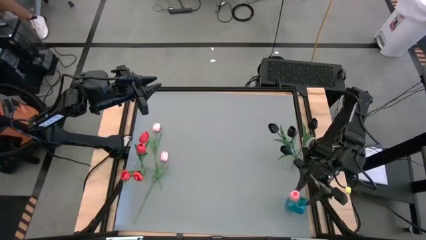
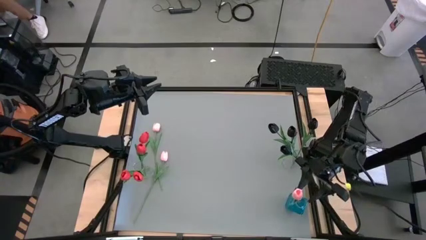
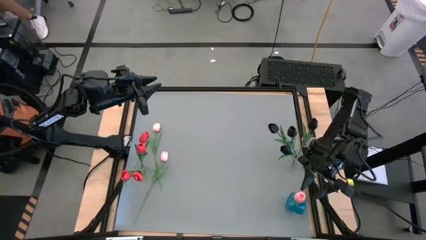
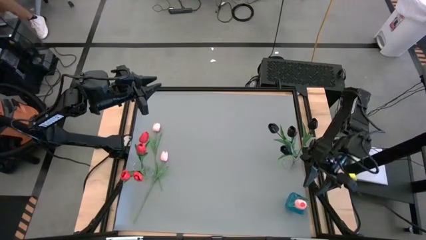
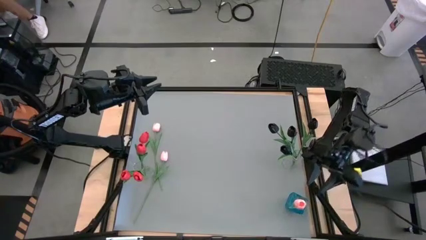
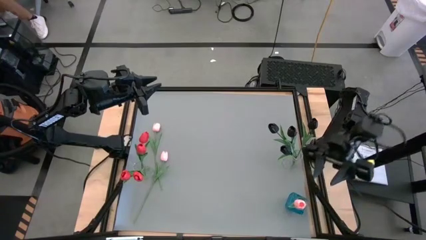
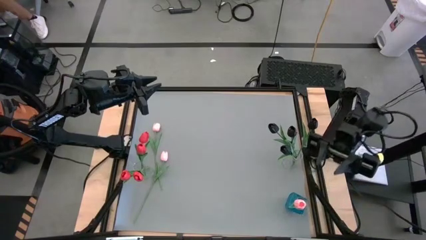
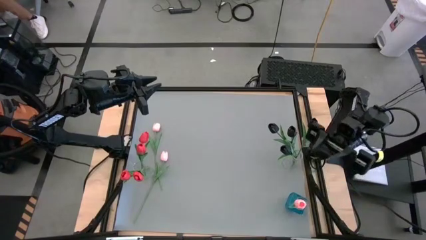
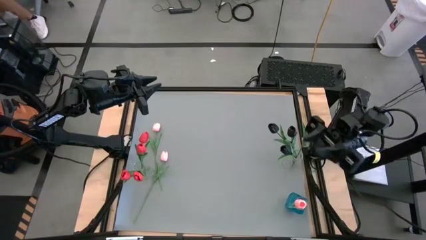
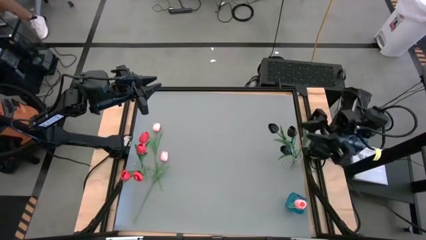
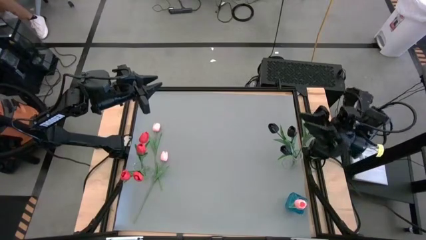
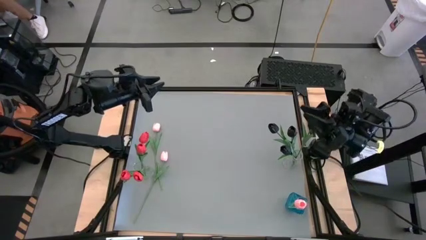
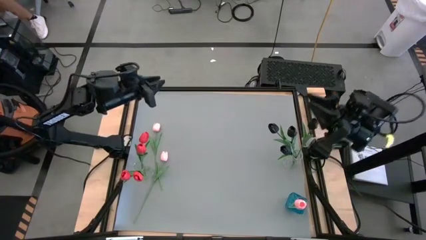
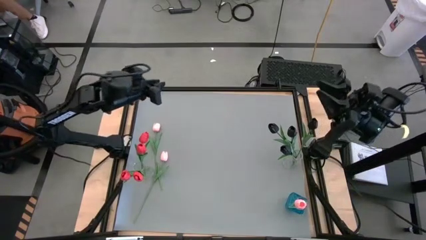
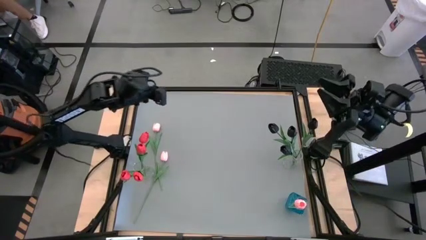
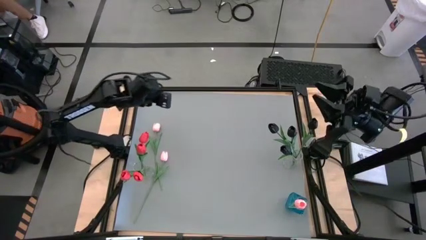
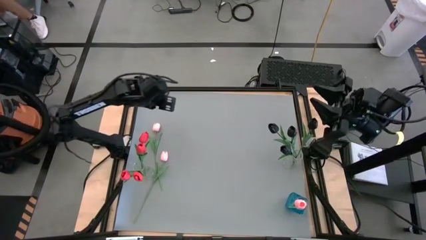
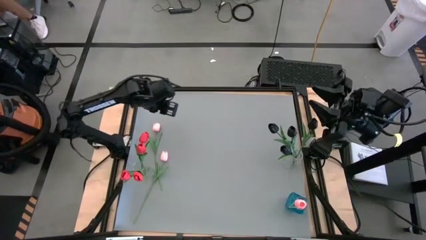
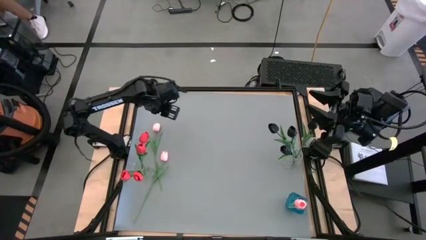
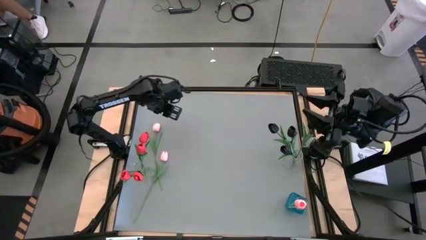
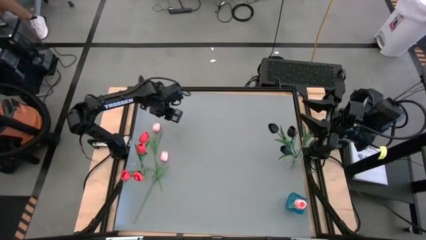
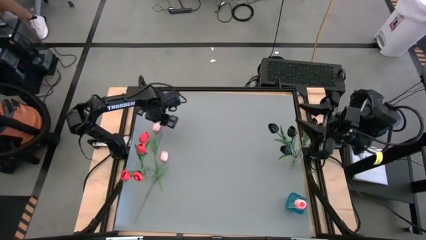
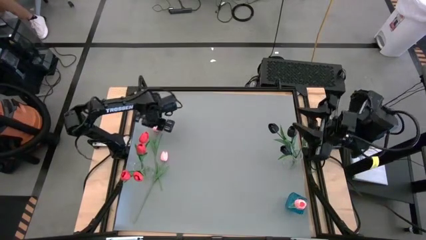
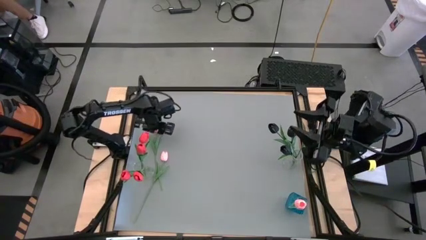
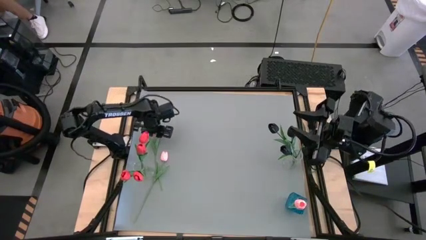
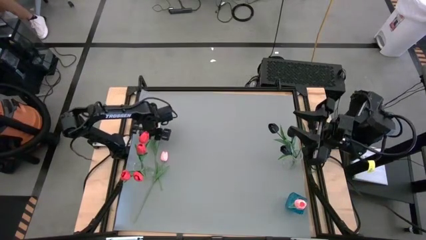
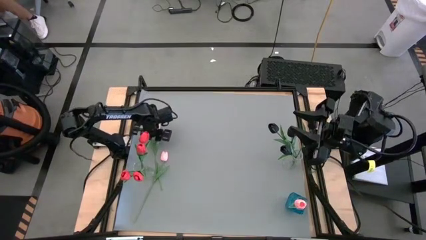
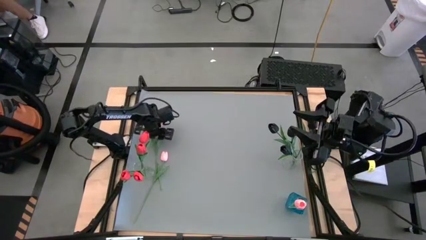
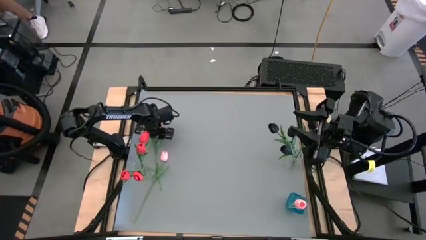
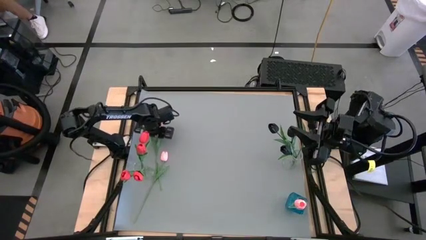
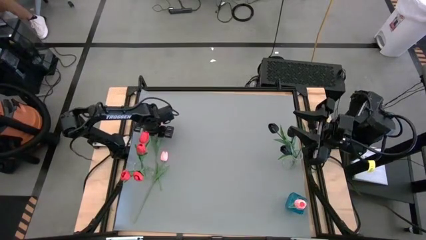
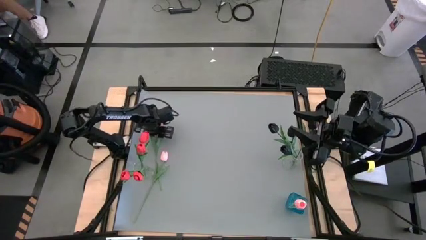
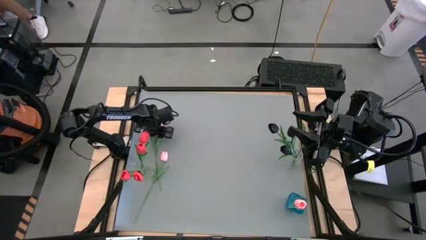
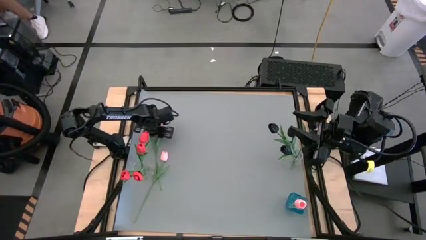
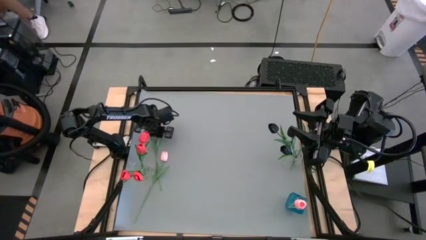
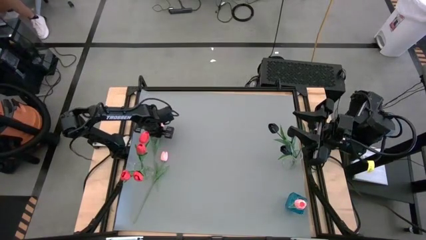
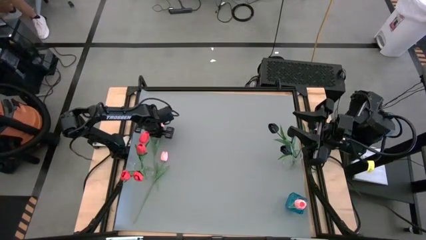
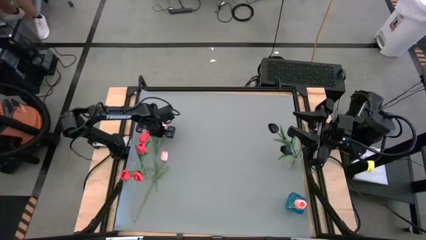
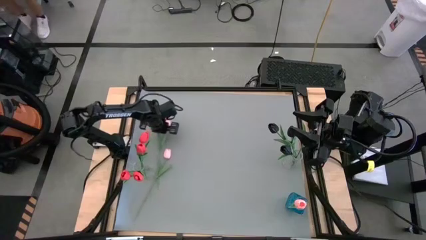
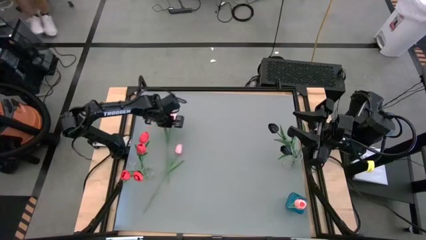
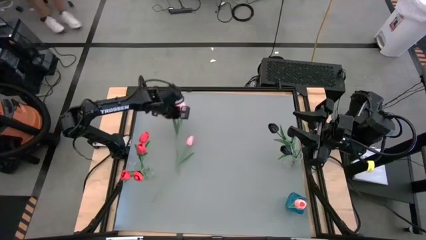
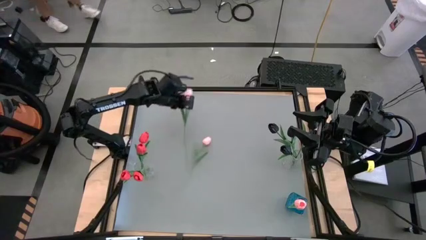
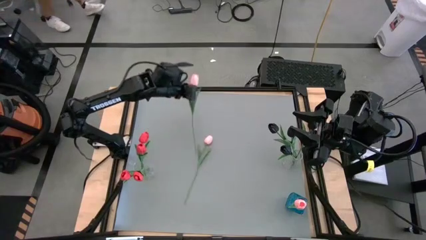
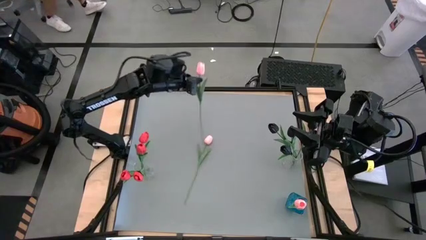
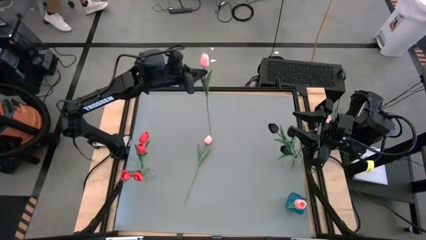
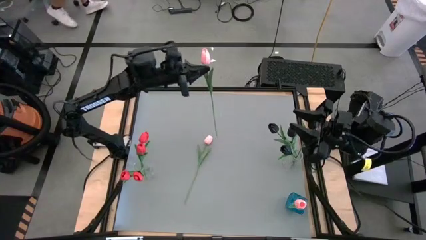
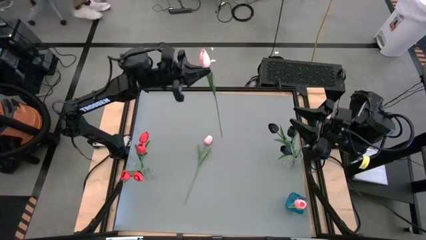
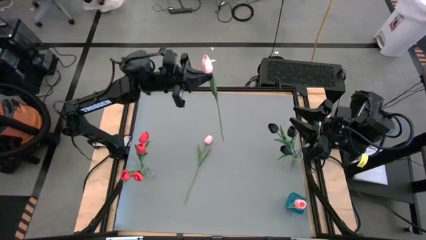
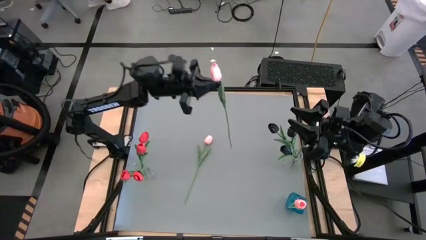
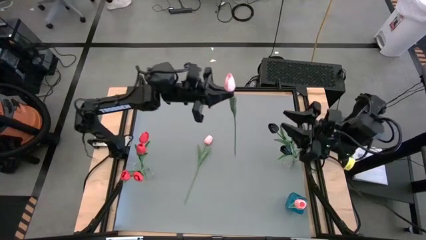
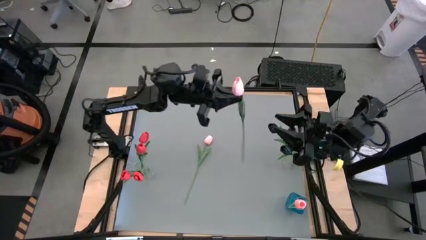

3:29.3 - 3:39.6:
Task: Sort flowers into vase by color
Put the top pink tulip into the blue vase

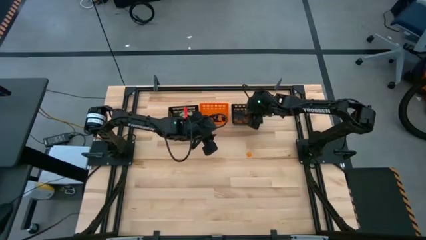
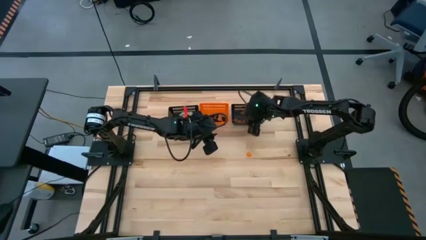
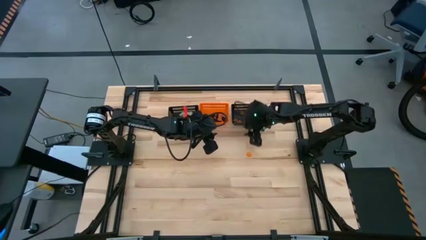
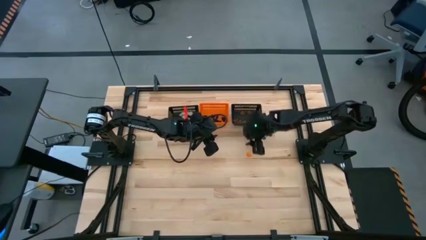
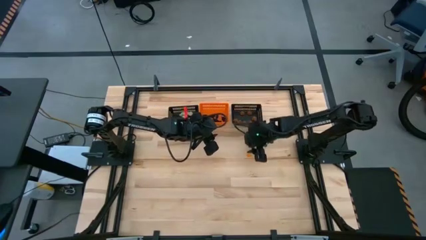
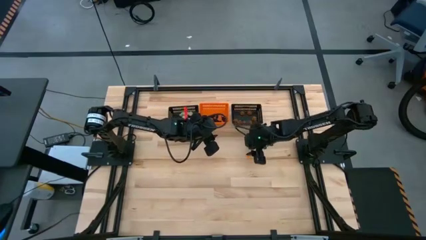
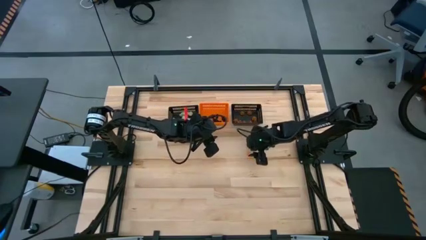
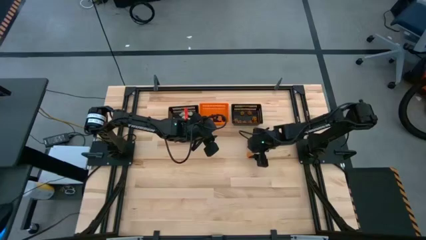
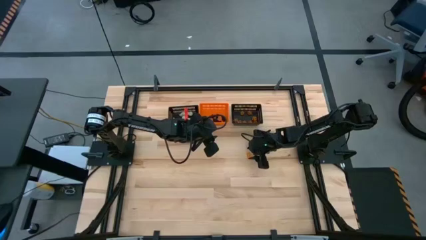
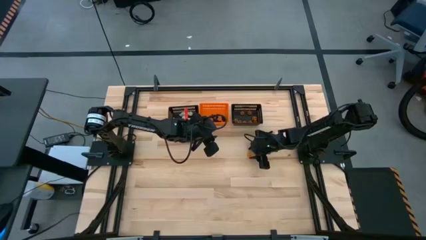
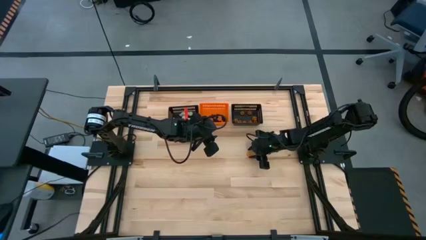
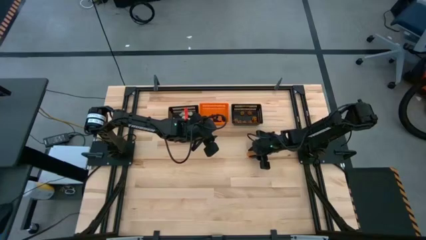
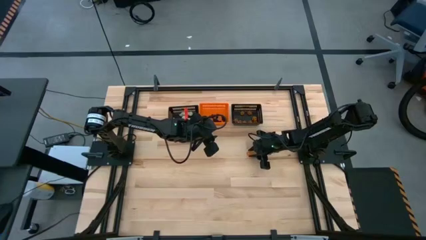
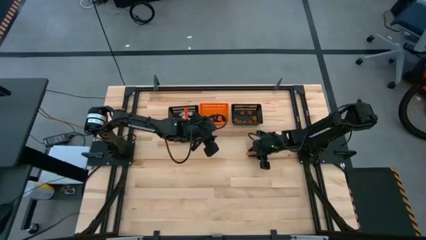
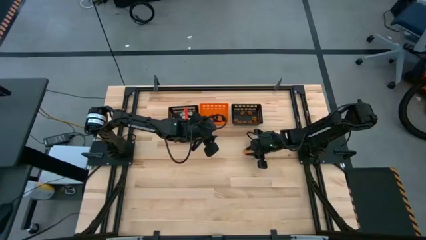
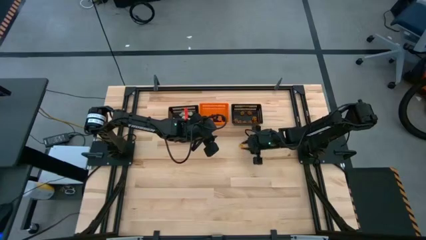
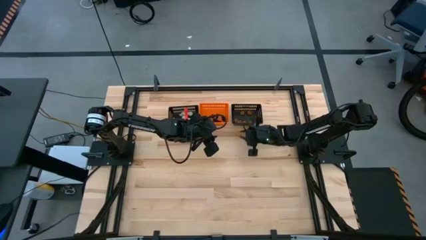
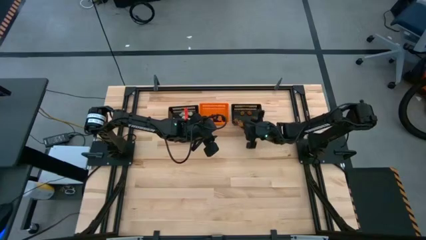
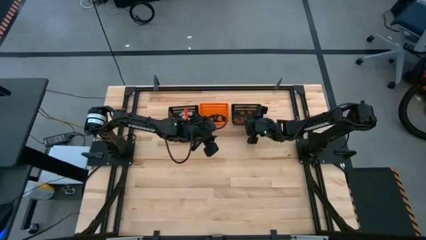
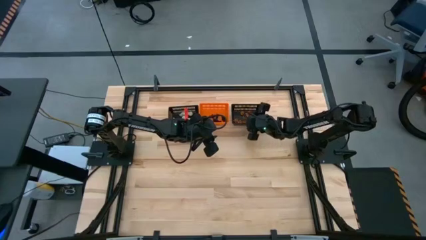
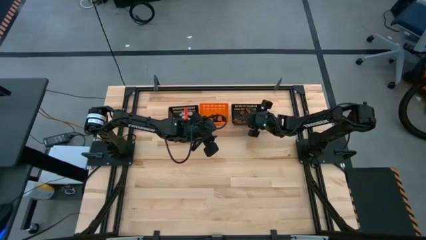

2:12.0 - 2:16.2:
Task: Sort Halloween decoration
Put the orange pumpkin toy into the right black bin
